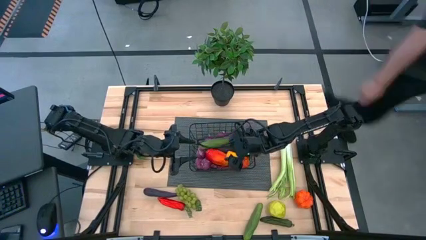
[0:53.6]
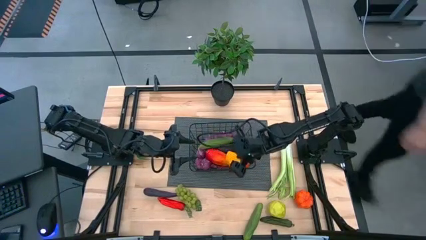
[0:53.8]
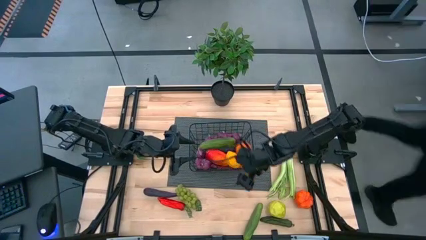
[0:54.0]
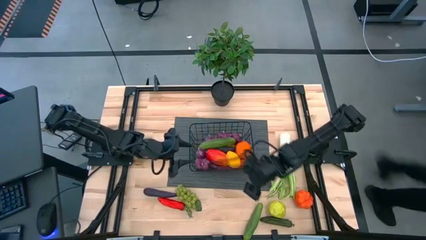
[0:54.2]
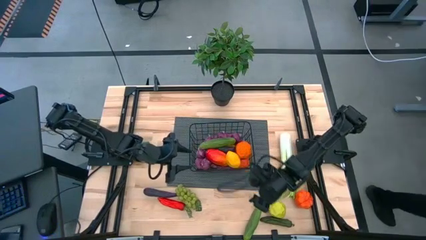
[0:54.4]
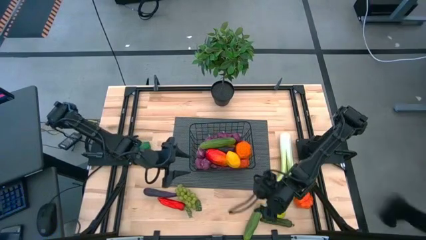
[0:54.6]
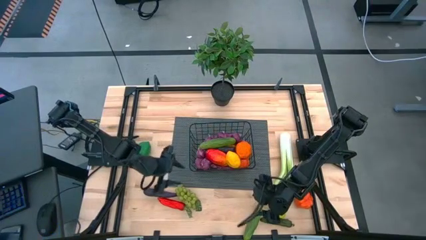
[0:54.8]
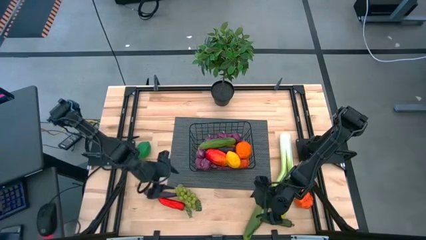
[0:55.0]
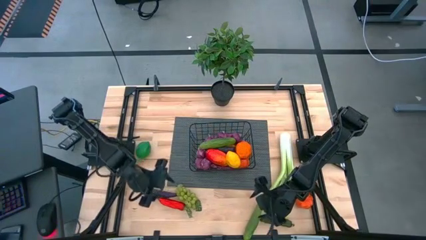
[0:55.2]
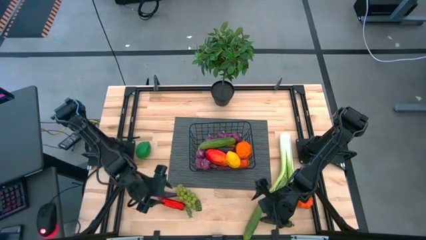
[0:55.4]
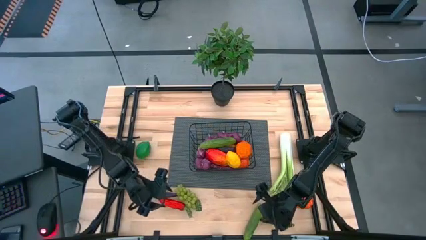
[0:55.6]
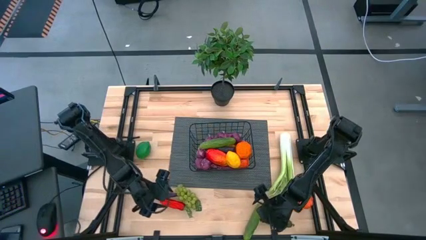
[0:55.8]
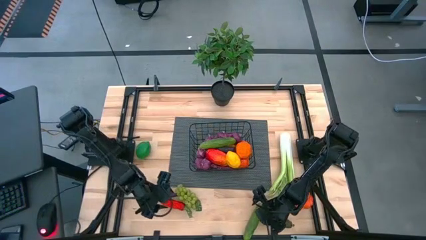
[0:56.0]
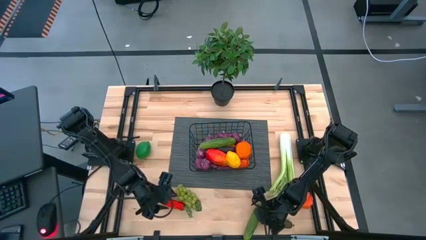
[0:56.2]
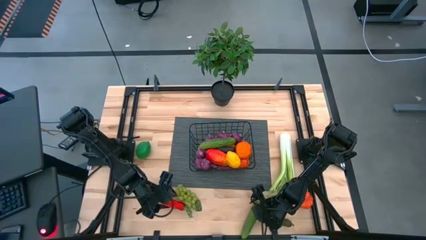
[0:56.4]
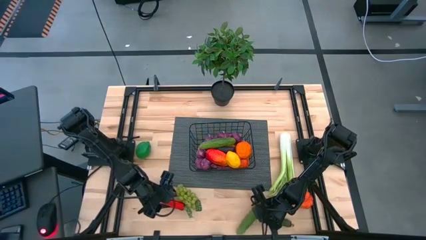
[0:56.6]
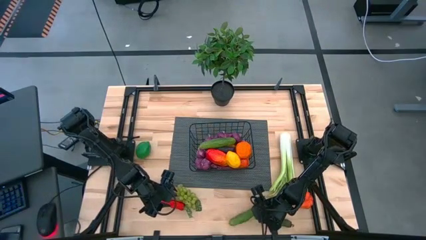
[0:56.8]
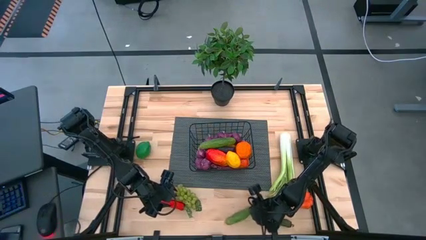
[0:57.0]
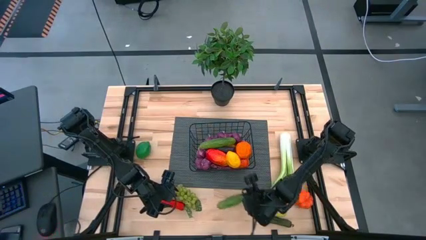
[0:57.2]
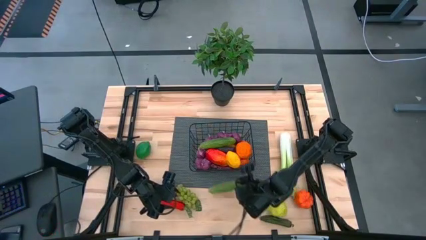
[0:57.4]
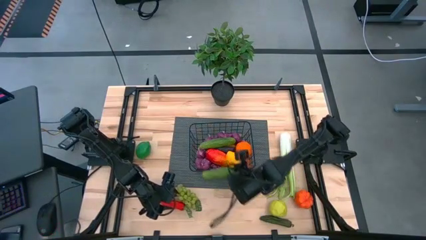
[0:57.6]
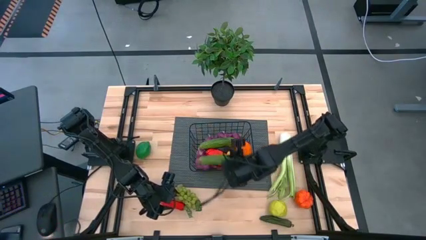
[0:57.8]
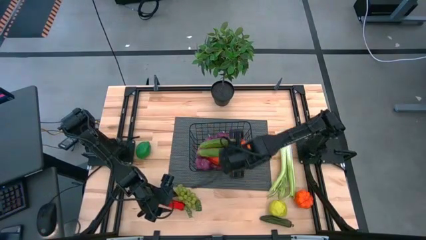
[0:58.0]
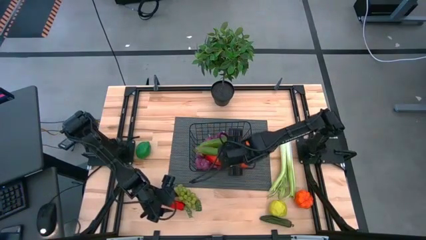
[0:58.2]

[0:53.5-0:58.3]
Task: Build produce basket
Put the cucumber into the wire basket

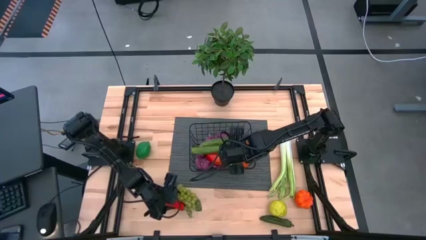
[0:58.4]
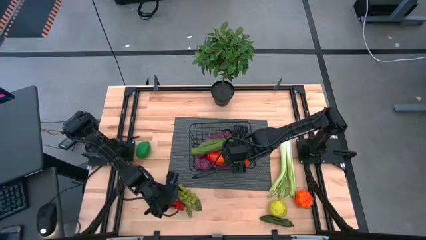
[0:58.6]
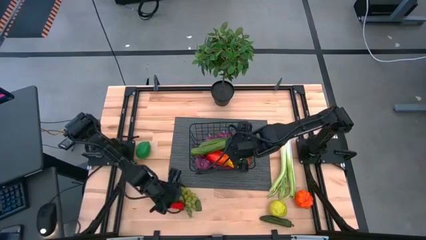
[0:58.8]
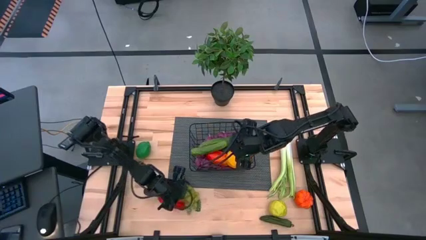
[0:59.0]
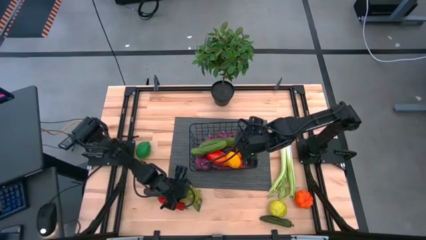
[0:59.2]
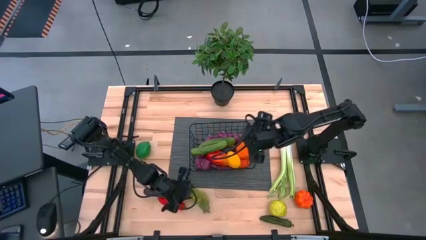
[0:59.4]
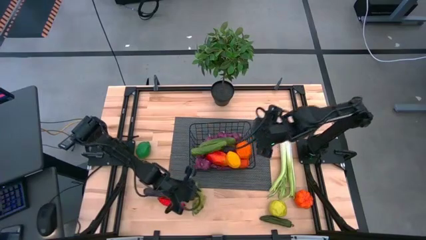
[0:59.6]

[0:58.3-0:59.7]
Put the grapes into the wire basket

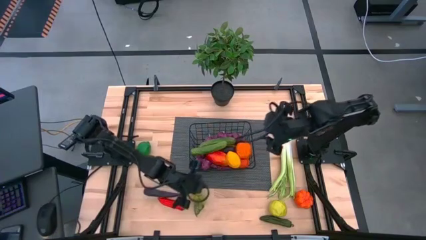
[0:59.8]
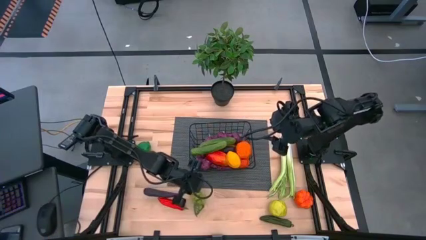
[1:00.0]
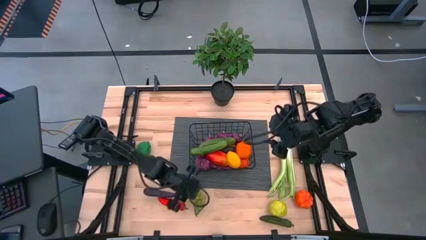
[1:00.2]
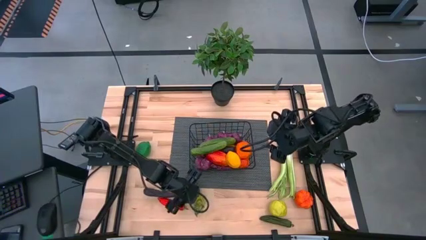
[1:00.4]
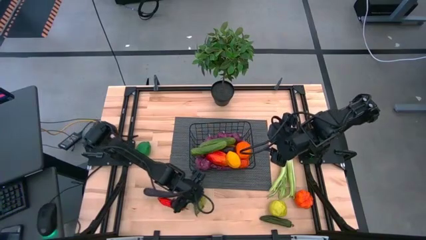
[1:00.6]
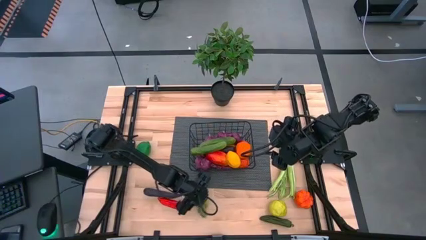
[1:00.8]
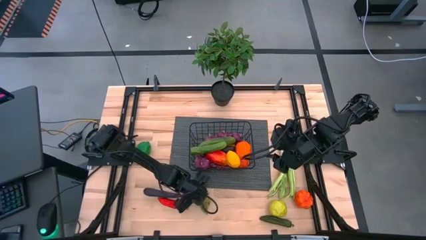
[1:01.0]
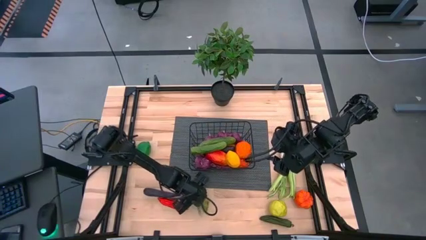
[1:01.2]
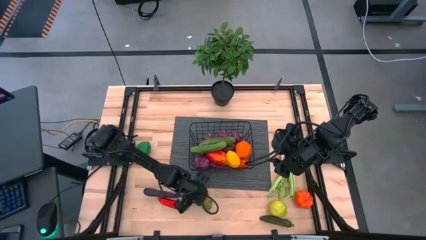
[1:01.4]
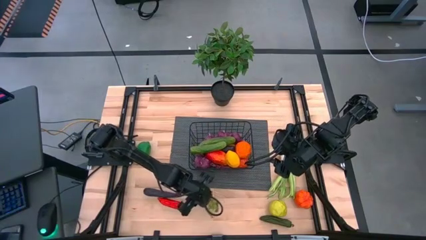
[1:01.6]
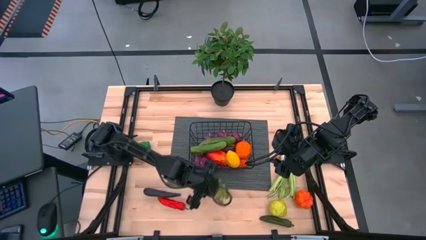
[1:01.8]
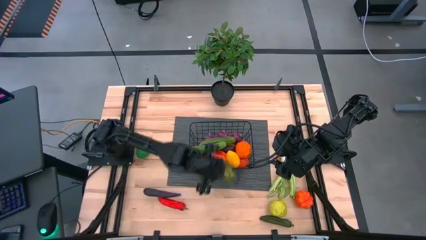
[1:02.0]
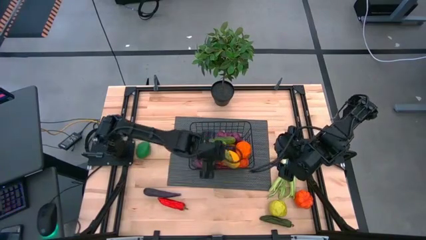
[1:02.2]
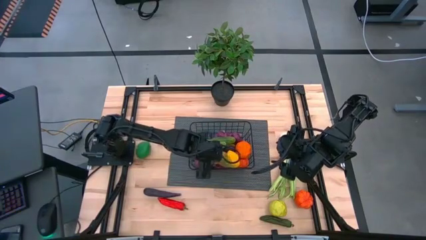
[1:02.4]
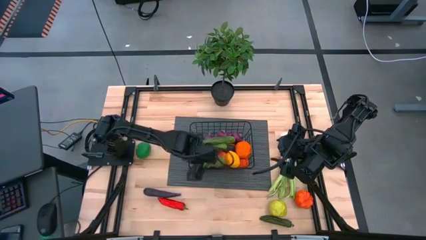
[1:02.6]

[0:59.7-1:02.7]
Put the grapes into the wire basket

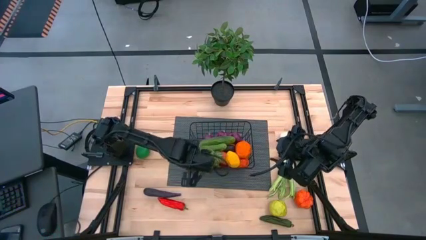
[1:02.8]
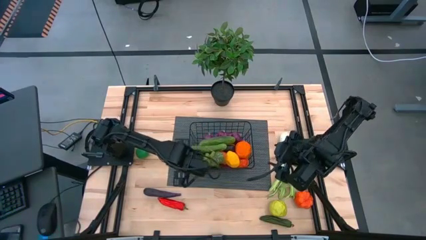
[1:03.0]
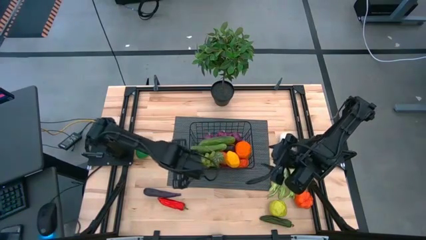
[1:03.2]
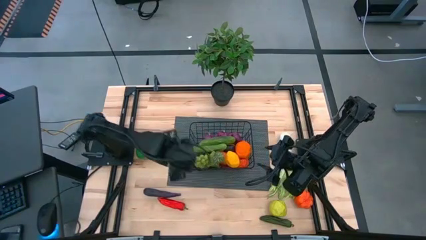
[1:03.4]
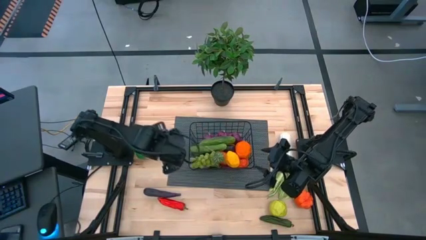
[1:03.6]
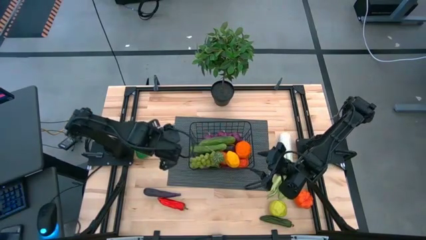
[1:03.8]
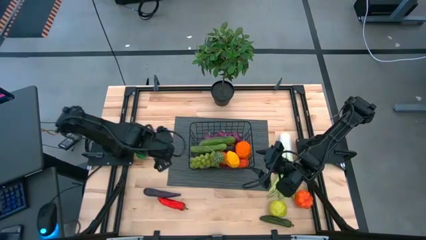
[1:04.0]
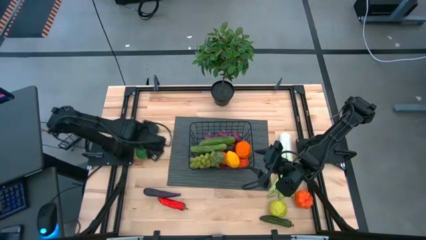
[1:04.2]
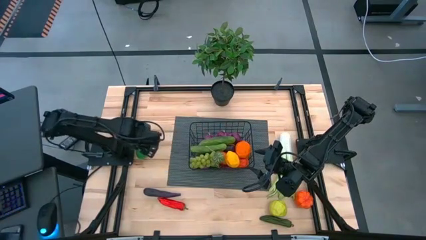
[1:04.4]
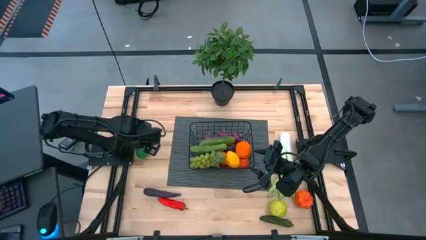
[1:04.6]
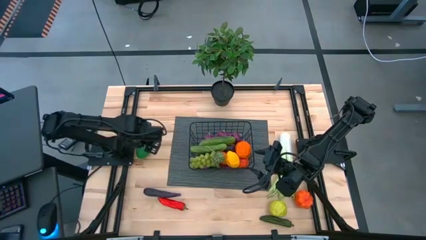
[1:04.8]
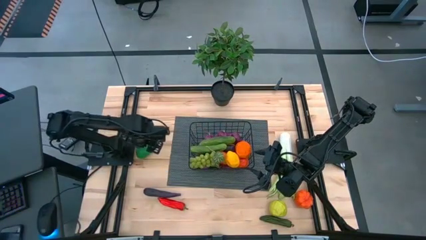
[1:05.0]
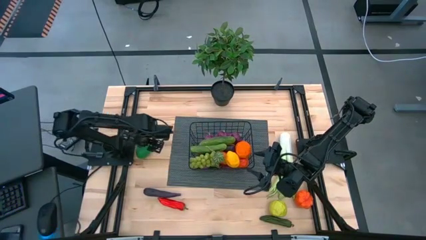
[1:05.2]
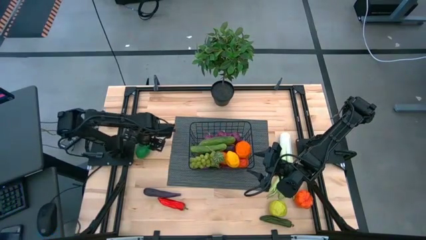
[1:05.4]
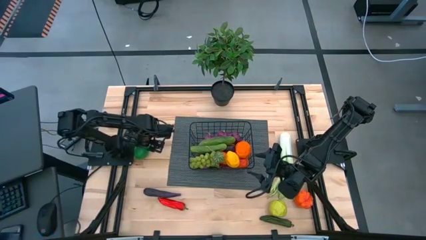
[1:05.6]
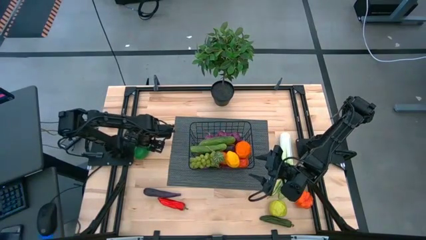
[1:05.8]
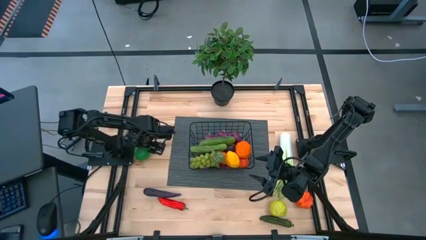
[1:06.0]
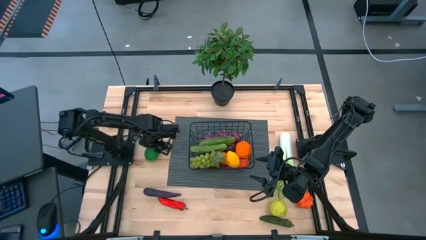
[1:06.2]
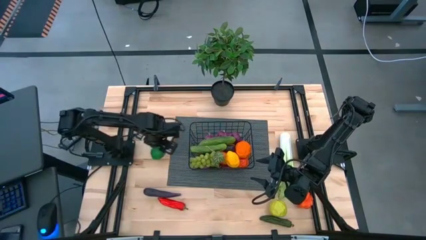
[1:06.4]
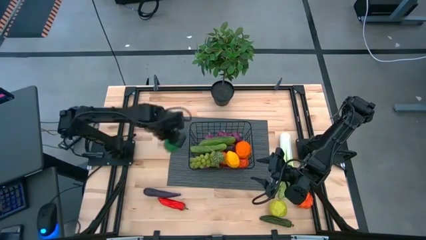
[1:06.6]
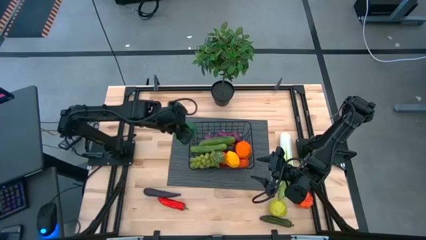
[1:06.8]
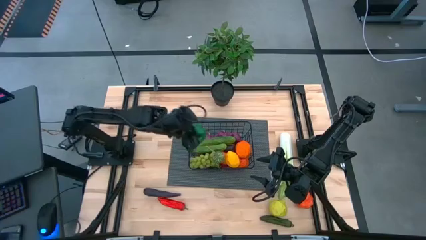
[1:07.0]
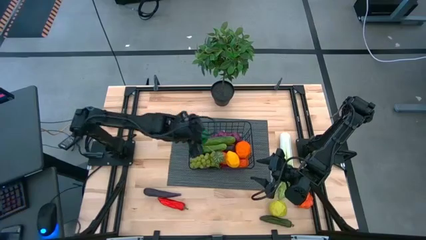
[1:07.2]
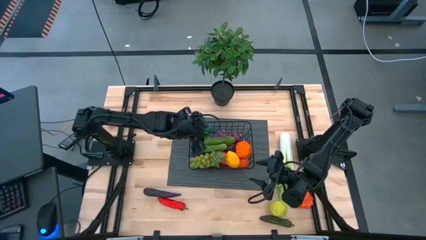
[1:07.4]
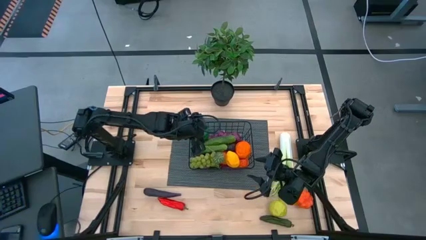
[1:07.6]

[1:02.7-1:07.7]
Put the lime into the wire basket

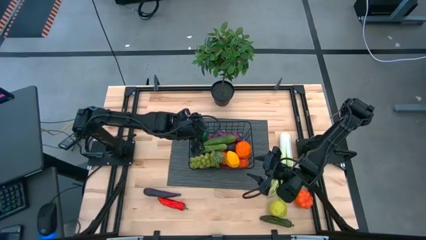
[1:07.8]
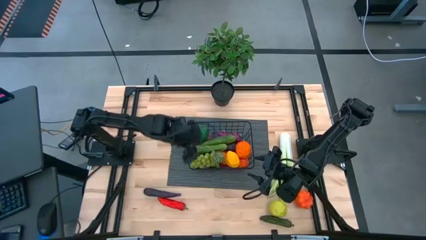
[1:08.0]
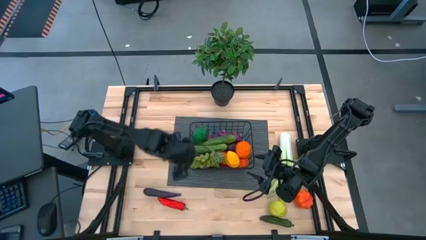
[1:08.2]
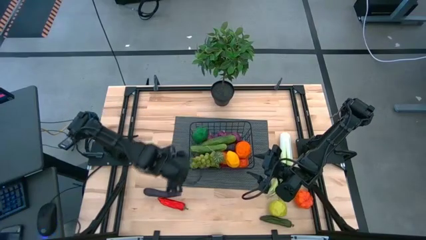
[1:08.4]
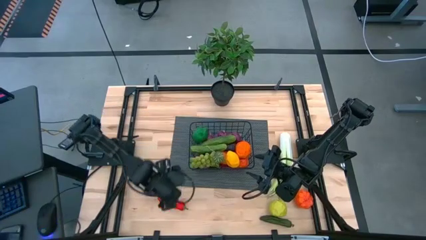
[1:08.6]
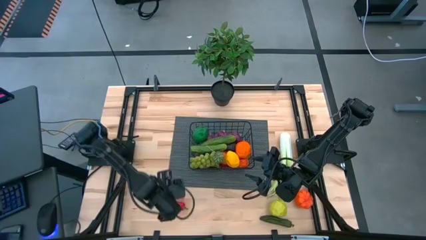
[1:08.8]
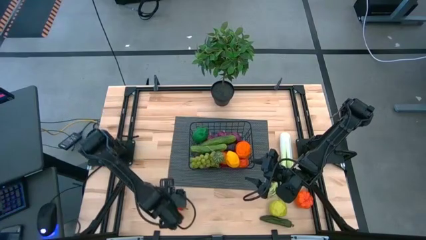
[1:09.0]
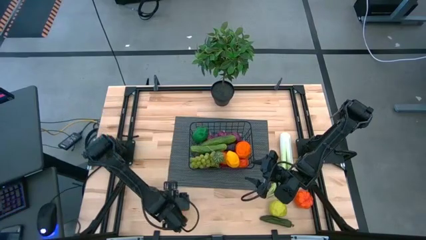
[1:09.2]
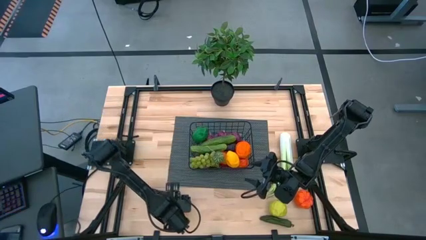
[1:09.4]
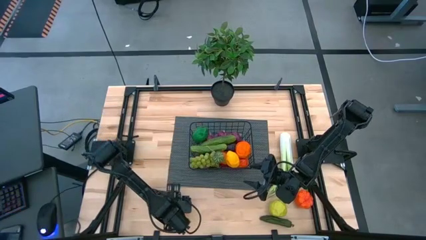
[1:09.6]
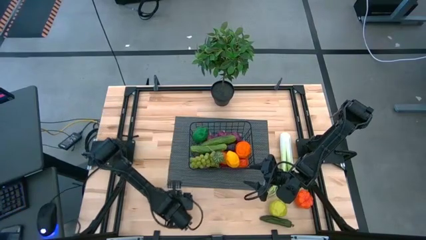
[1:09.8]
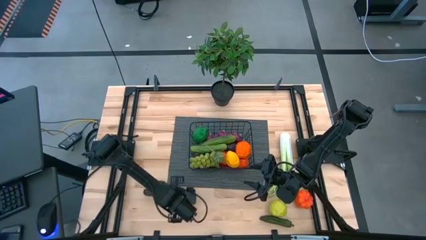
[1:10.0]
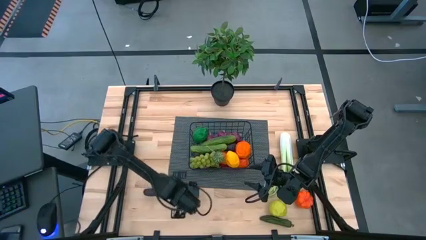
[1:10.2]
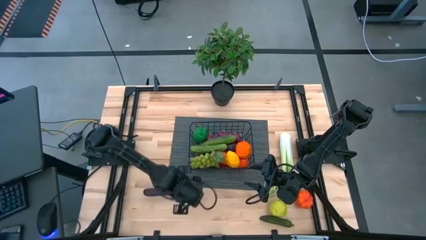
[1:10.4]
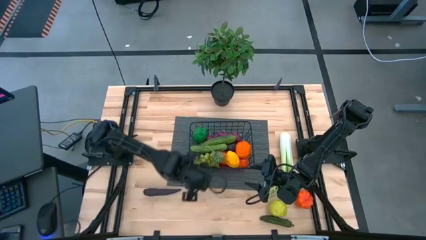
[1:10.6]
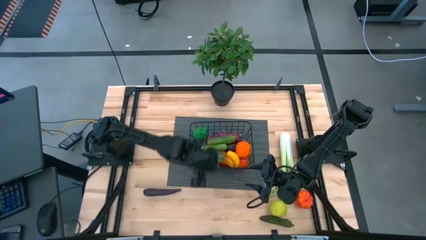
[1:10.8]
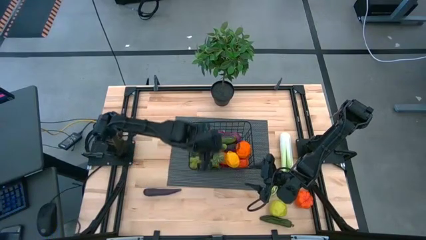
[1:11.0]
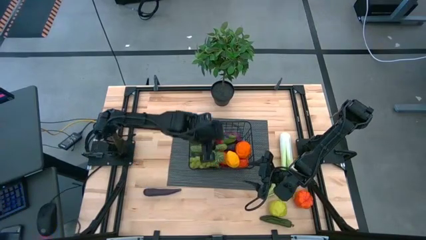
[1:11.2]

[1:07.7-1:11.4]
Put the red chili pepper into the wire basket
